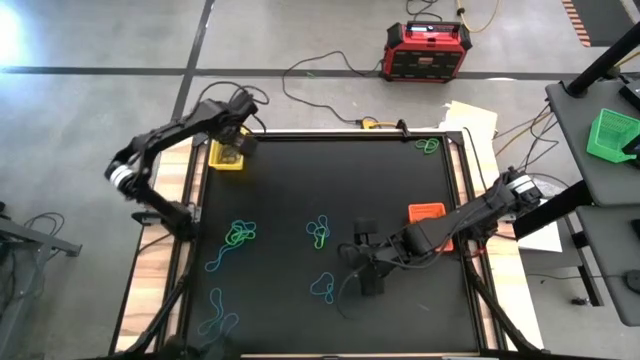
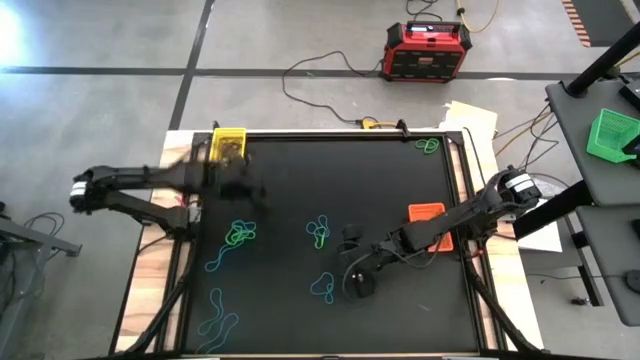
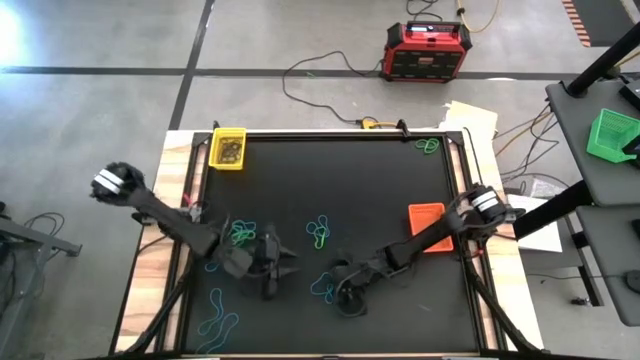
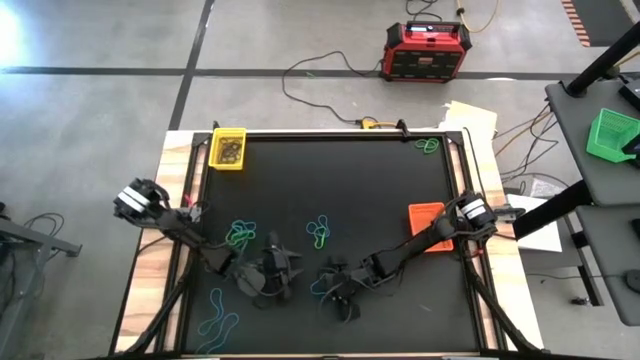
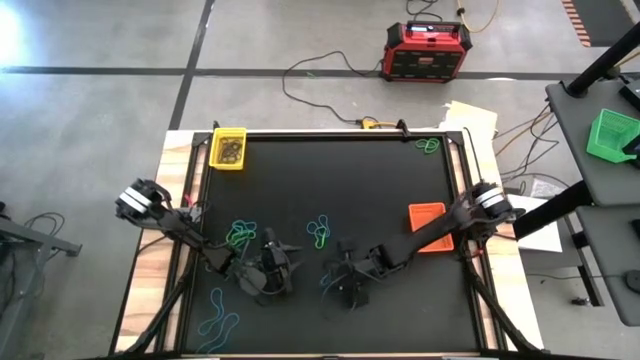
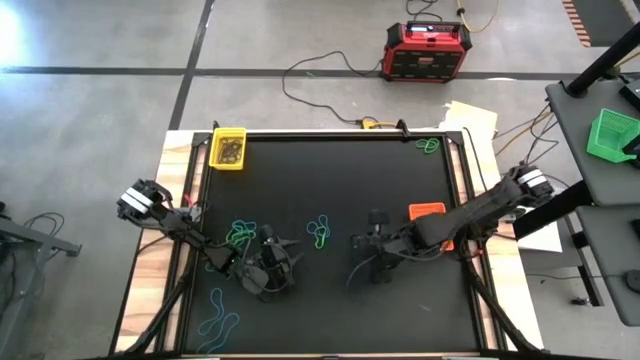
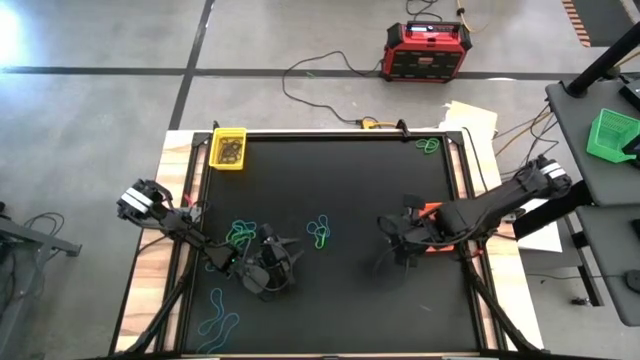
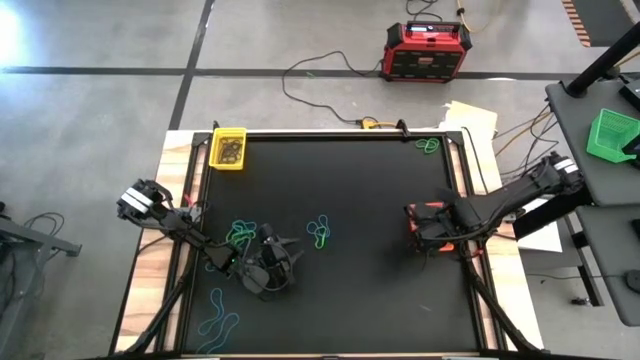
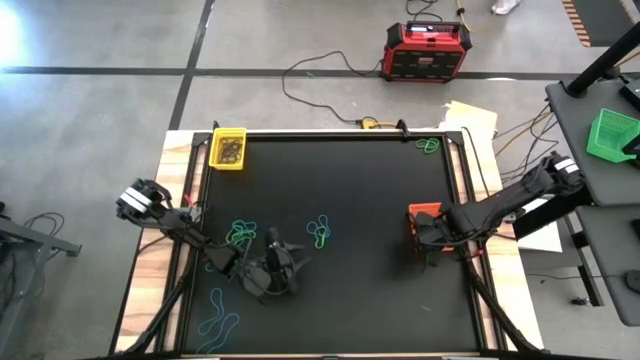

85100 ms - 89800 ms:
Task: Sort rubber bands into baskets
Put the blue rubber band into the orange bin

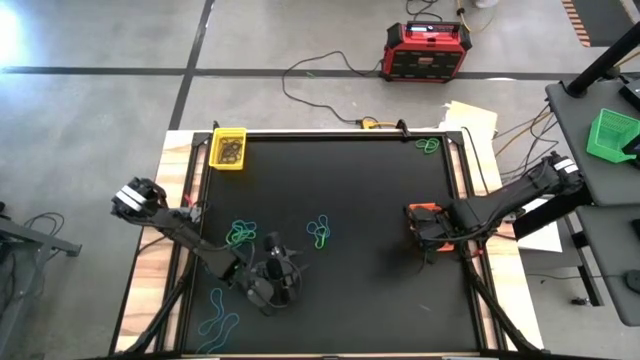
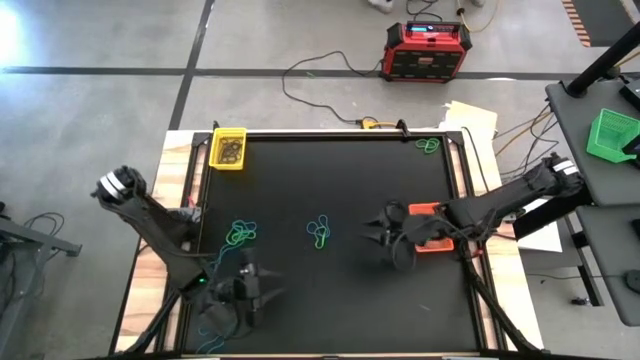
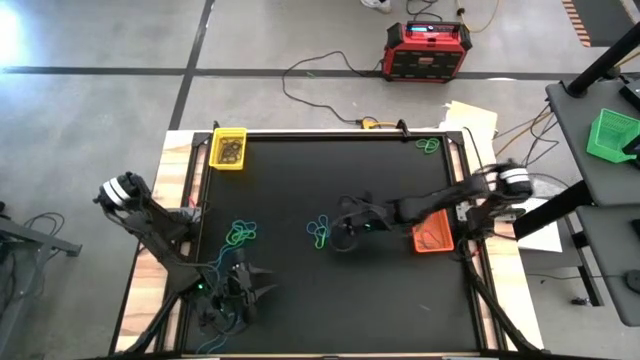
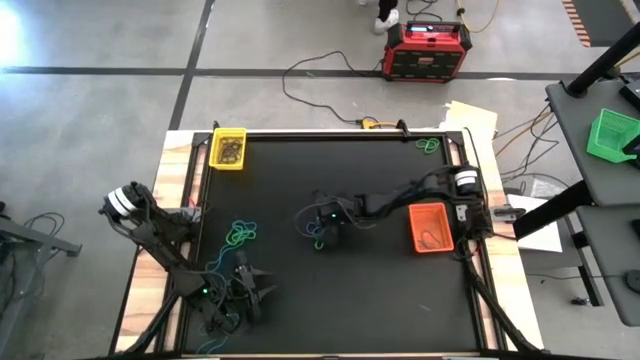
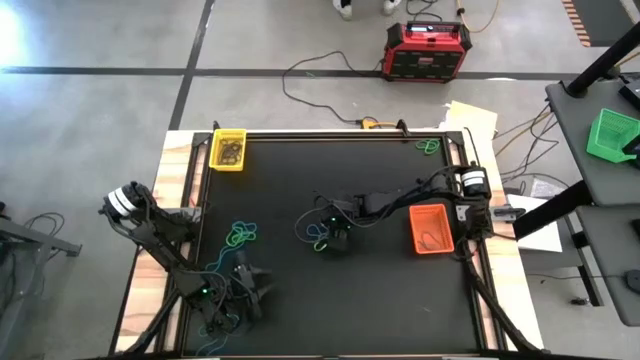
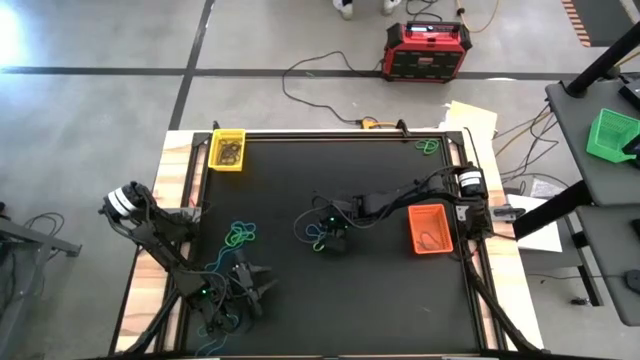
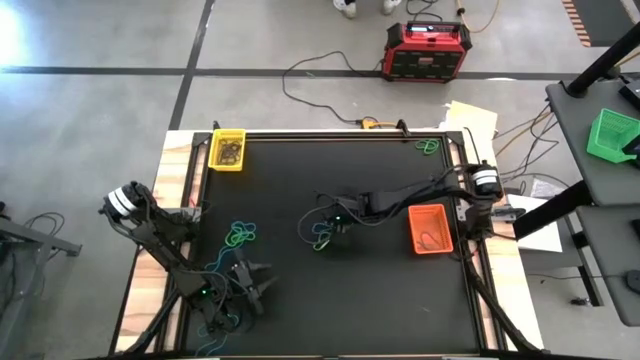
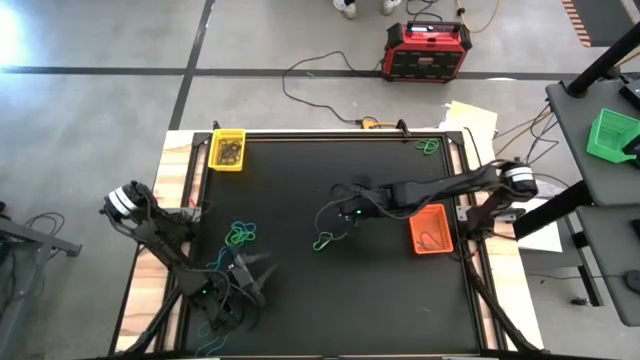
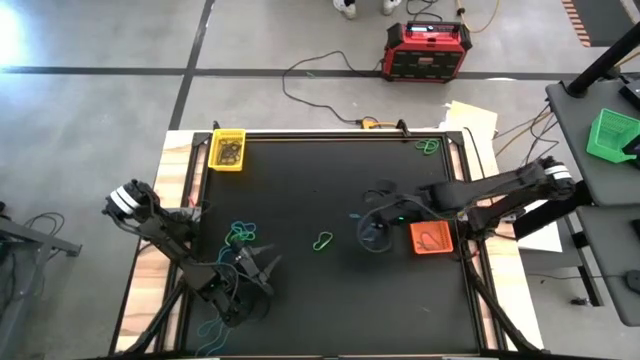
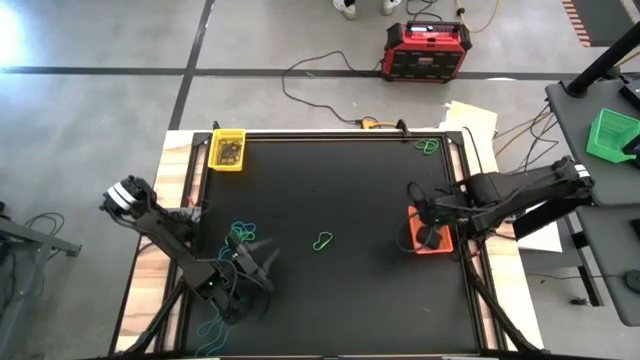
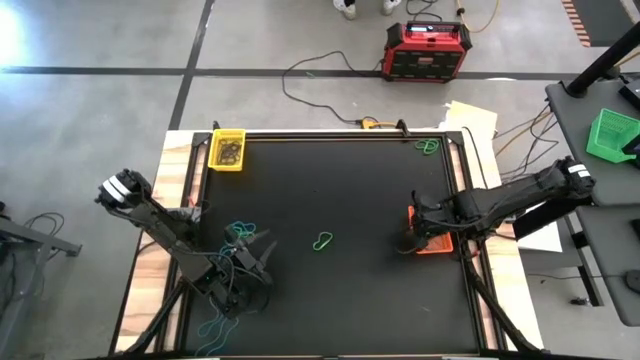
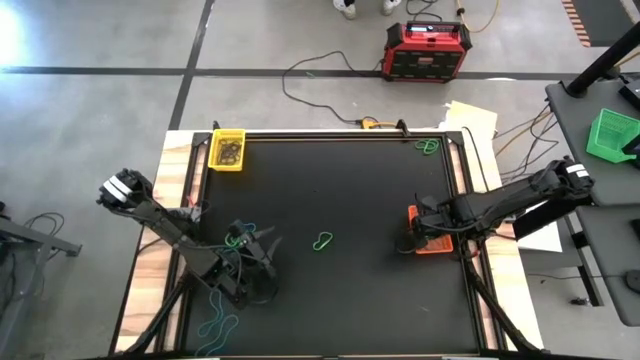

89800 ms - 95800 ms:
Put the blue rubber band into the orange bin

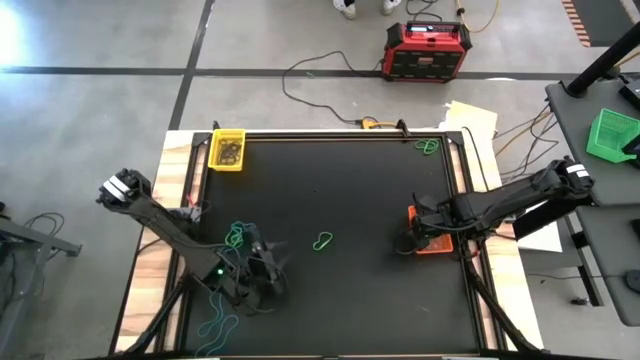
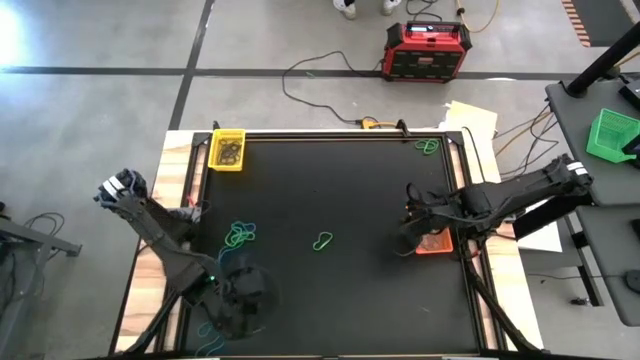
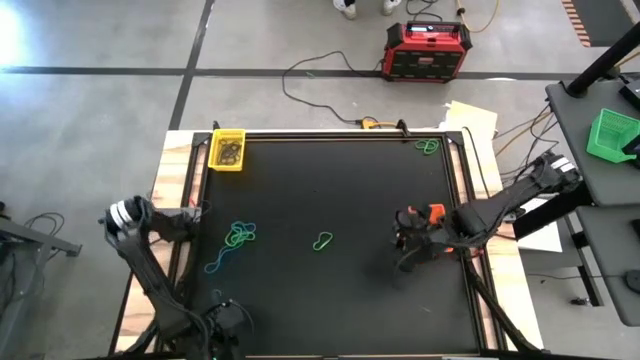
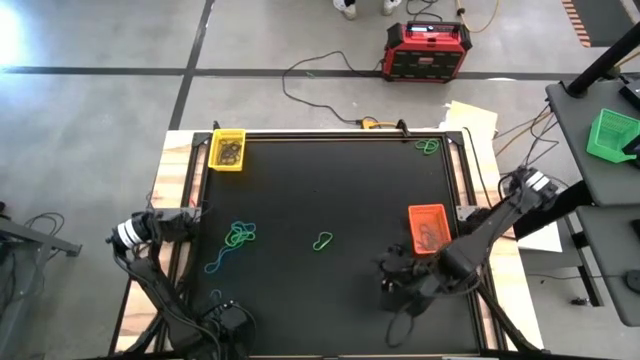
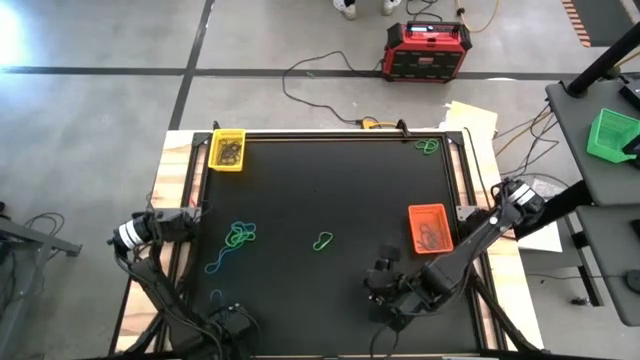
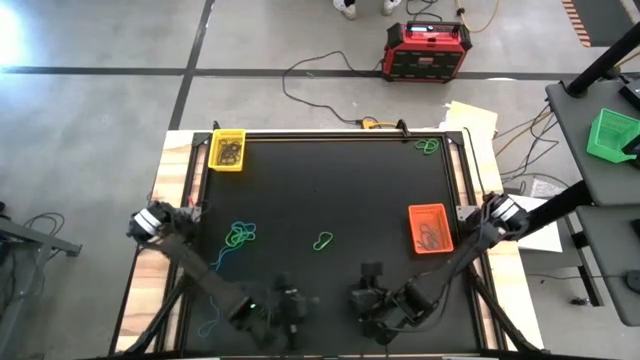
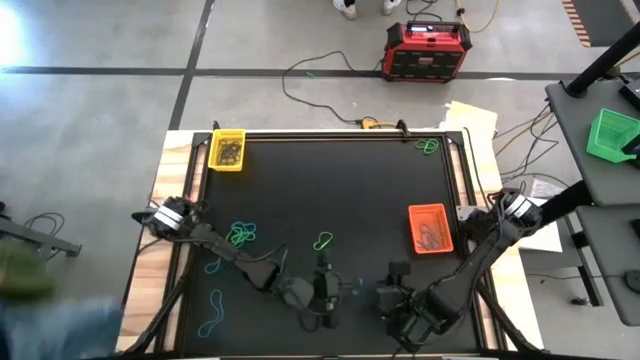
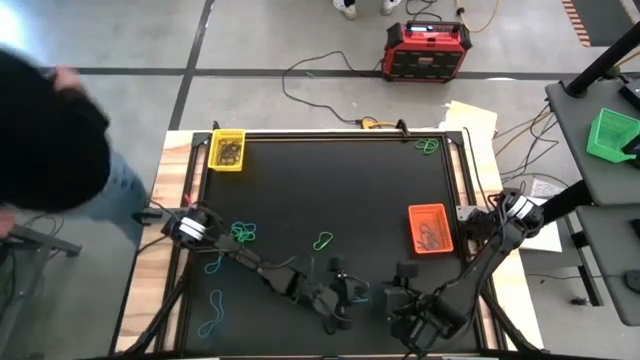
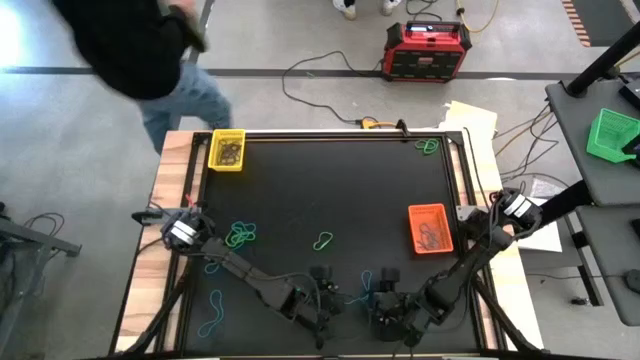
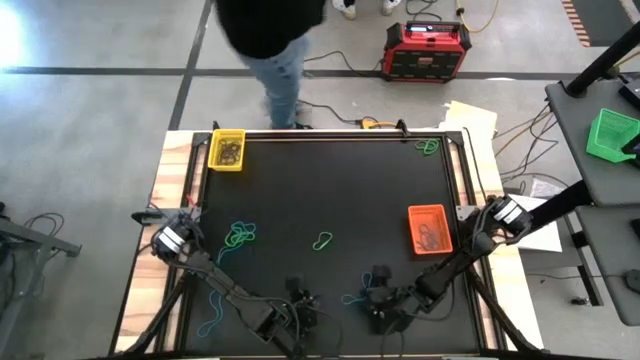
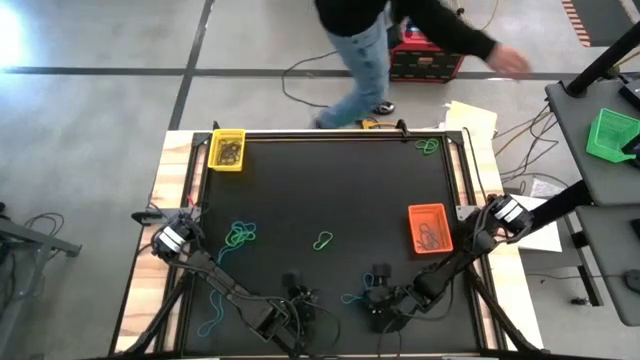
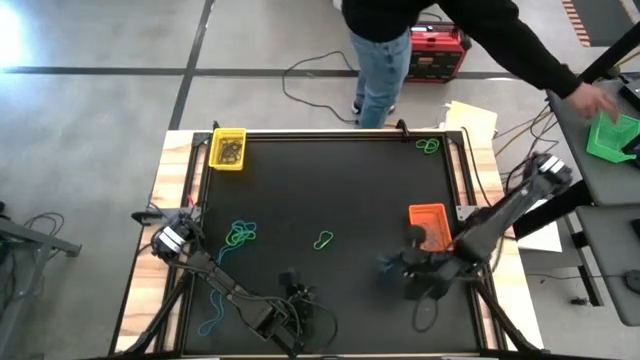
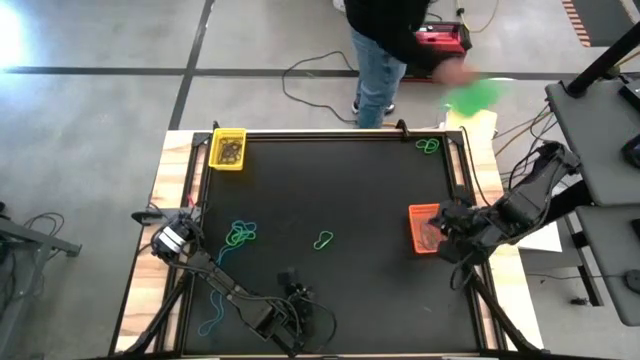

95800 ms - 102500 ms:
Put the blue rubber band into the orange bin

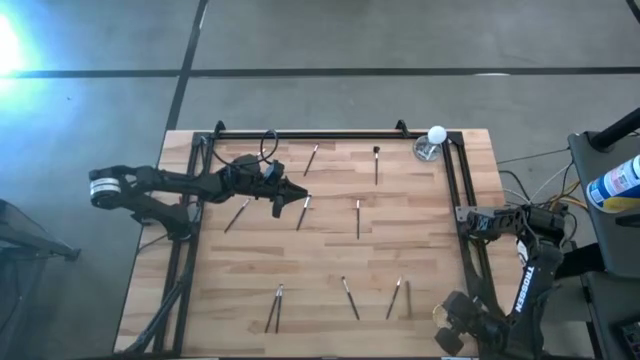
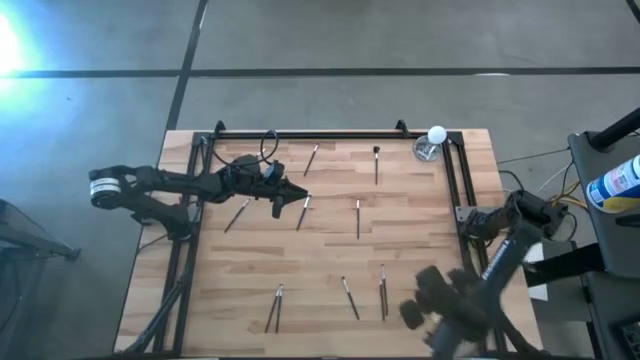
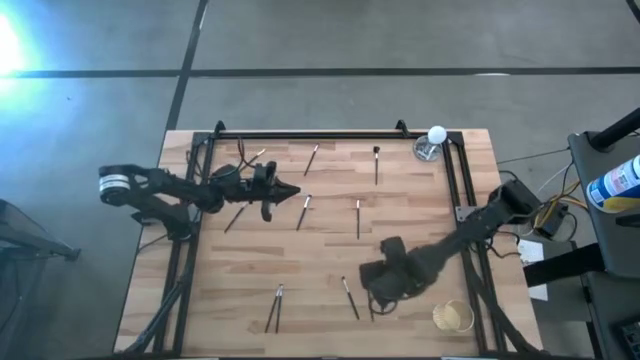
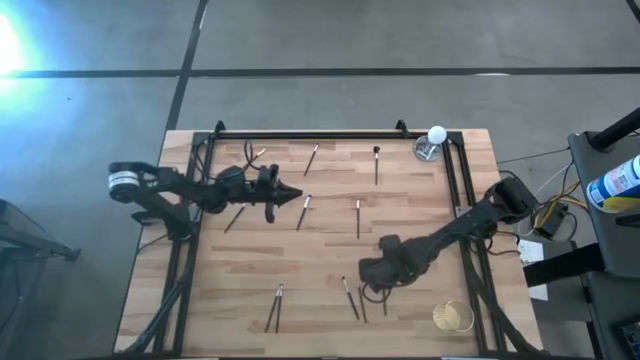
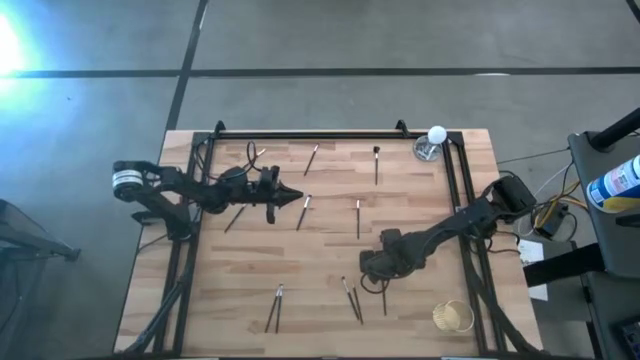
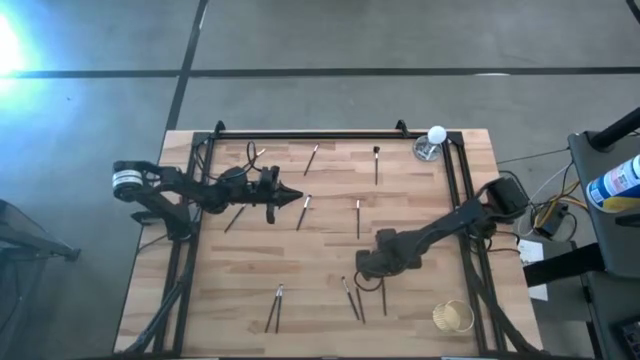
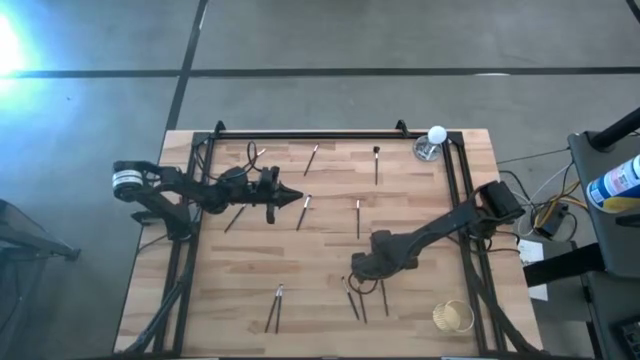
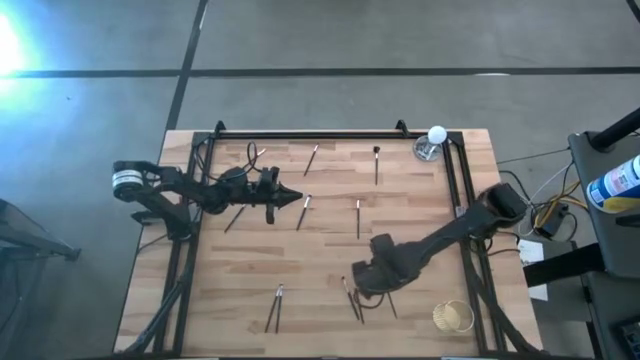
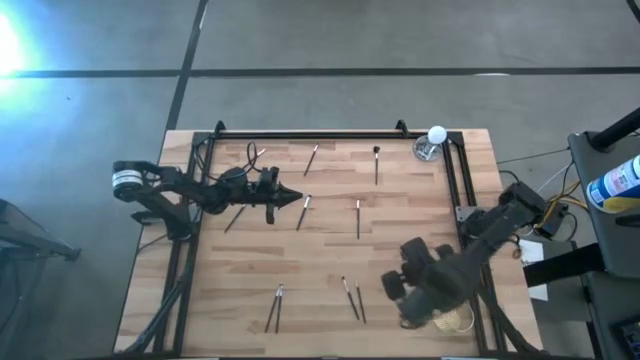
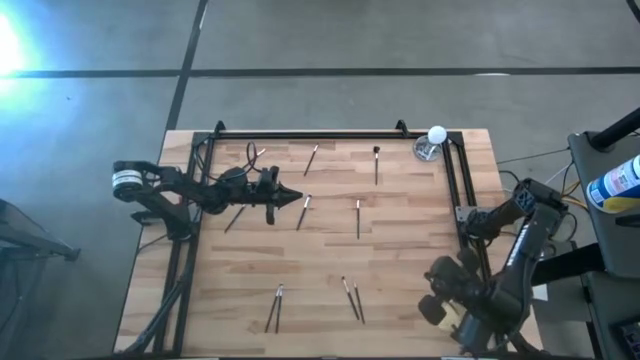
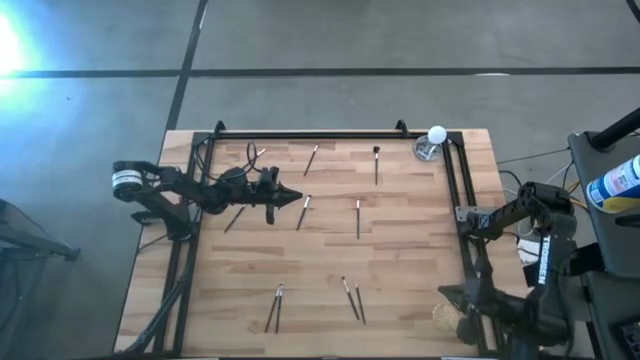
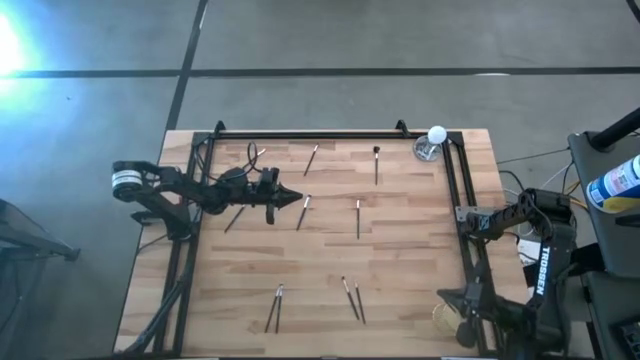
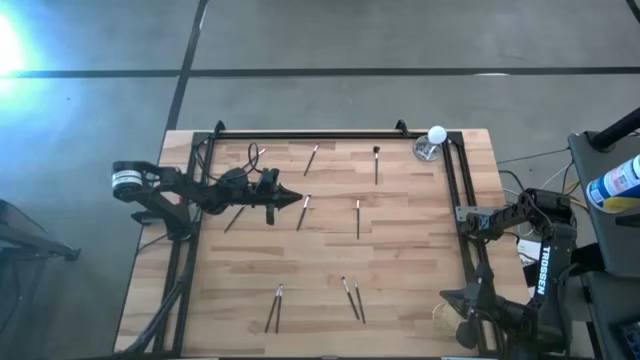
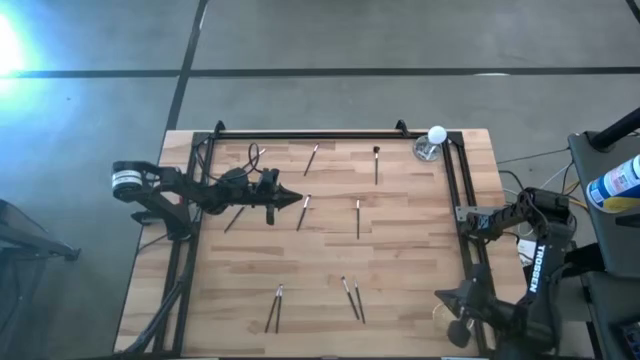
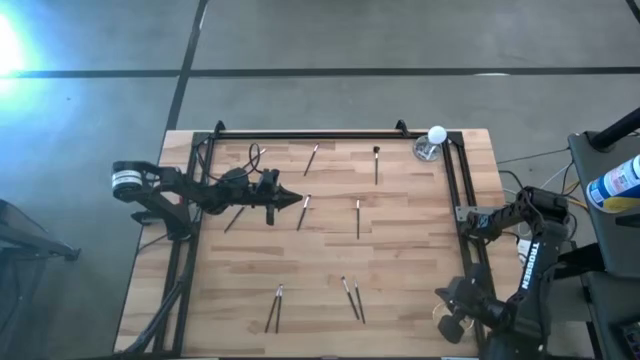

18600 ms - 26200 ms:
Task: Pick & Place Makeup Brushes
Put the eyeshadow brush into the makeup brush holder
